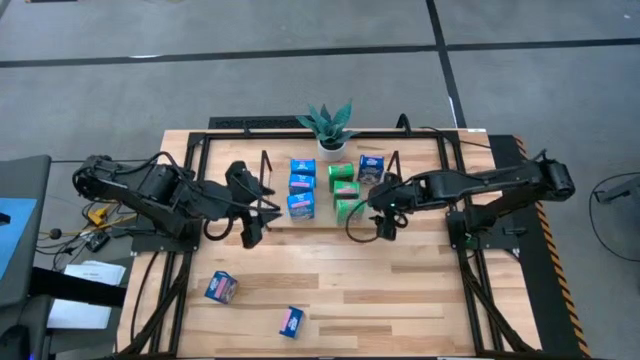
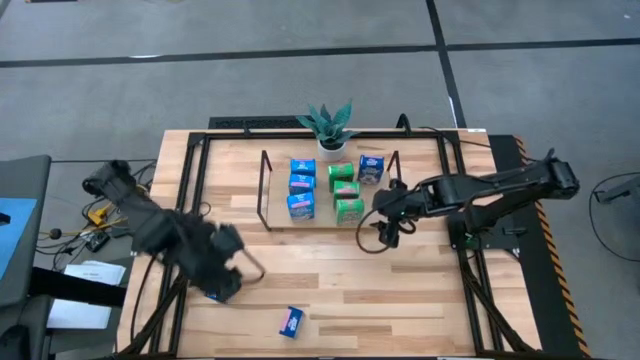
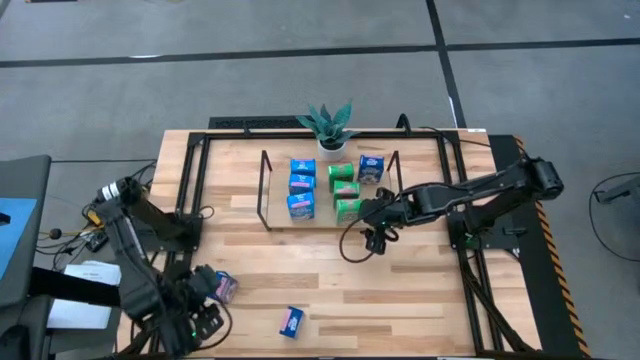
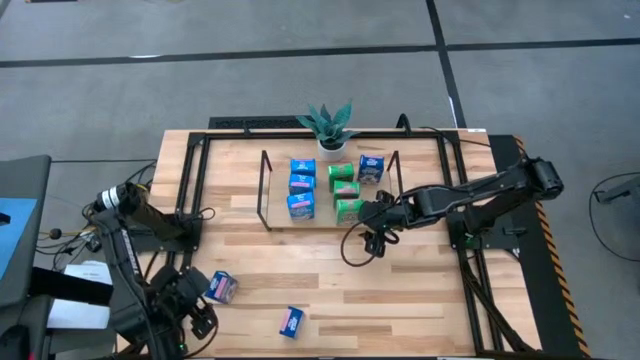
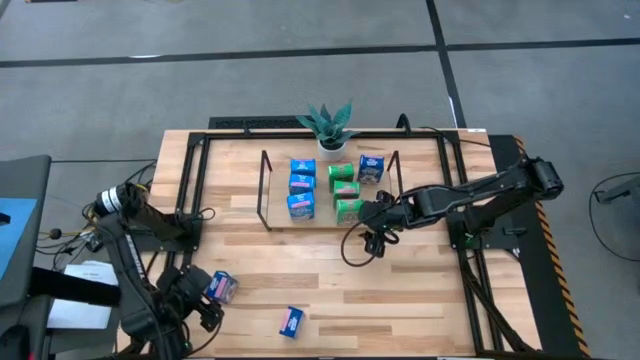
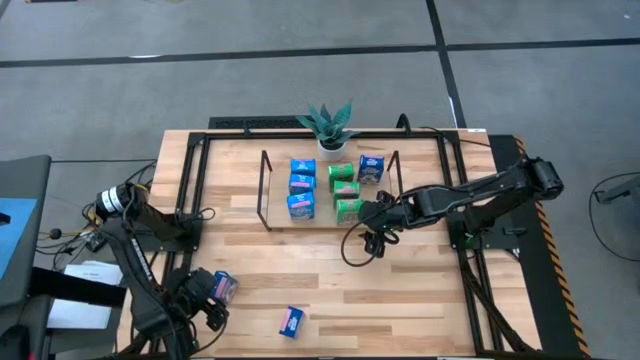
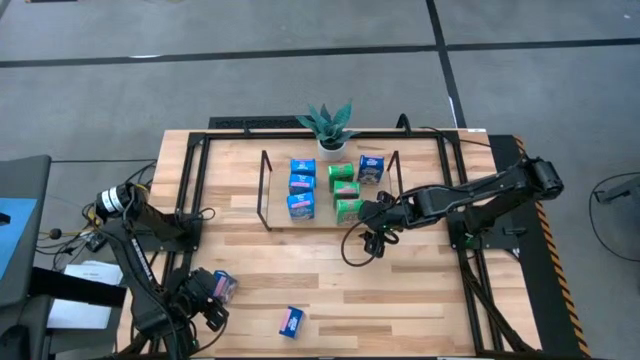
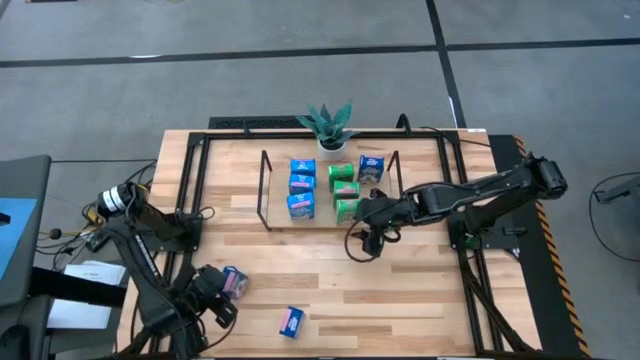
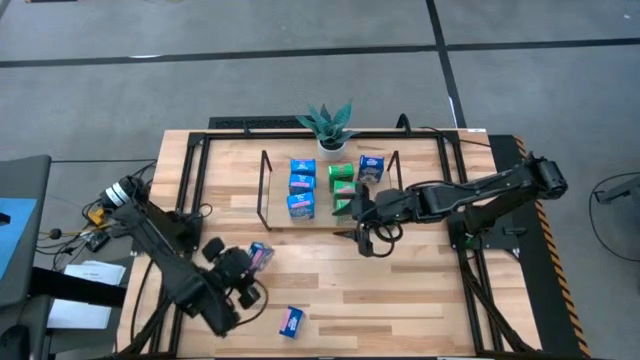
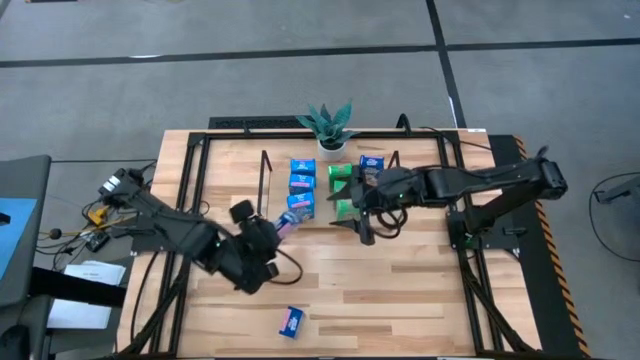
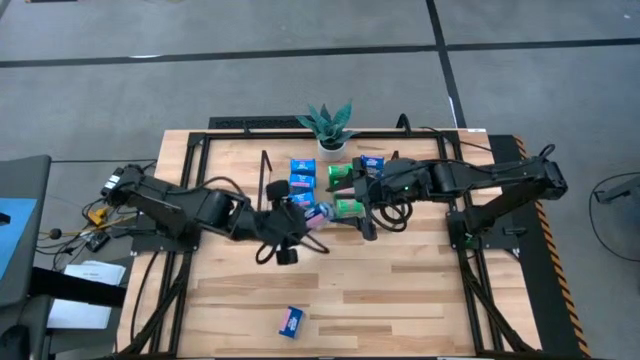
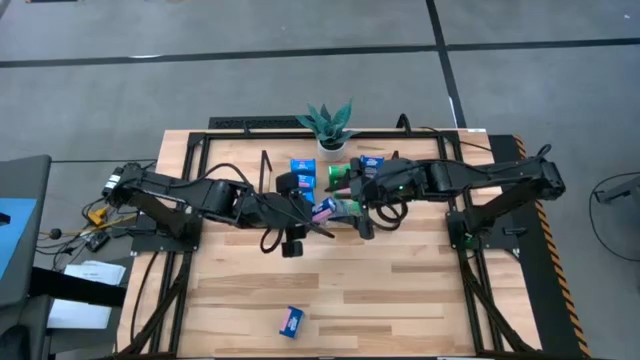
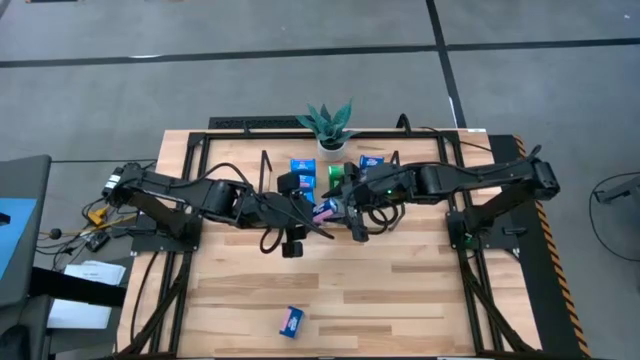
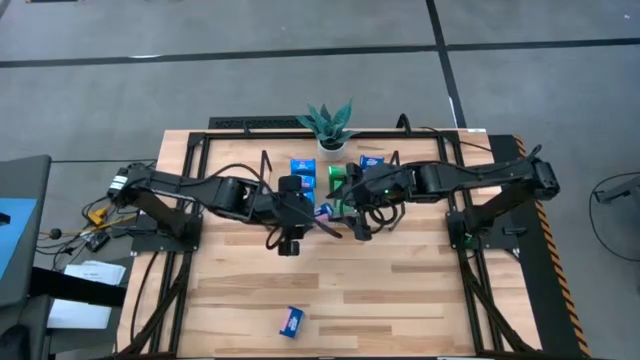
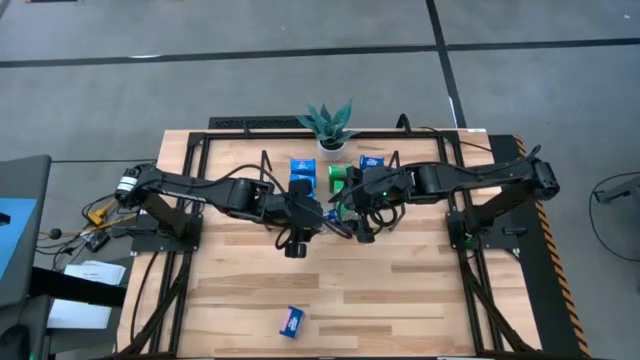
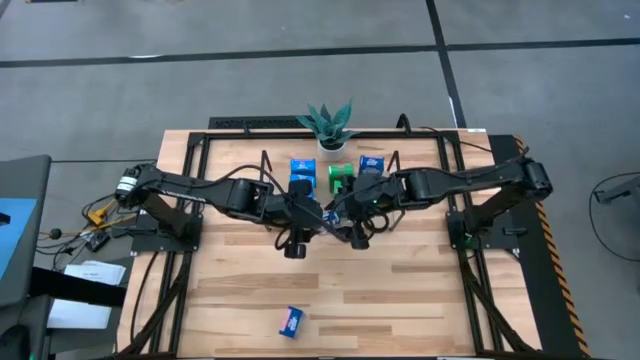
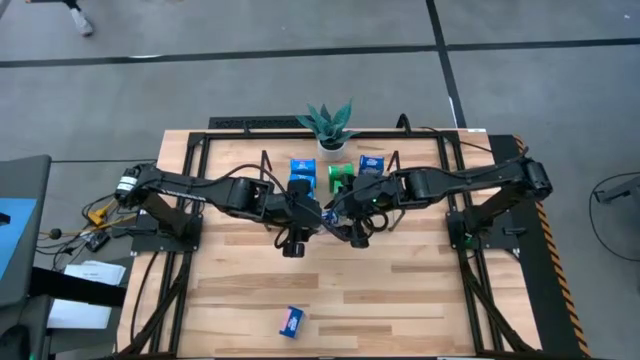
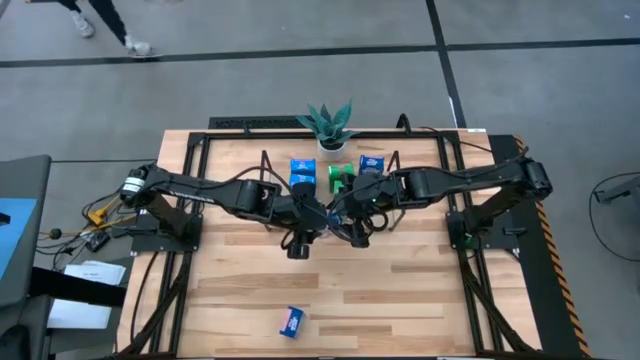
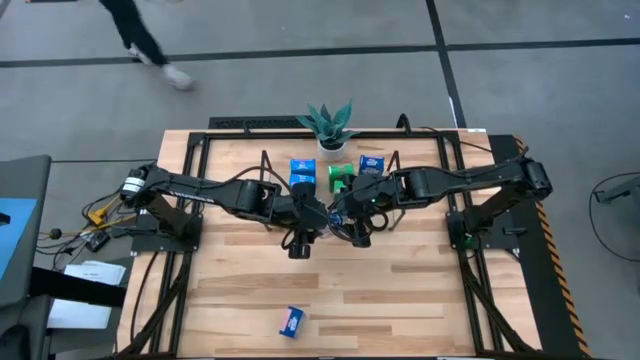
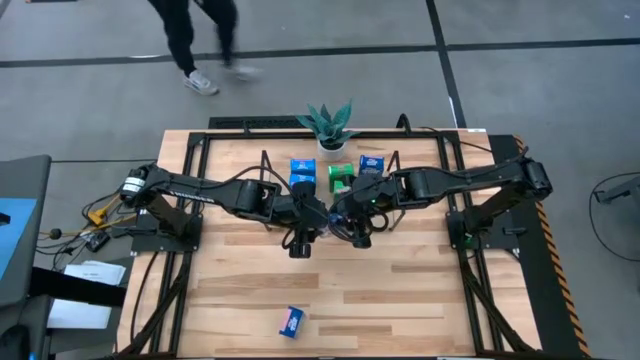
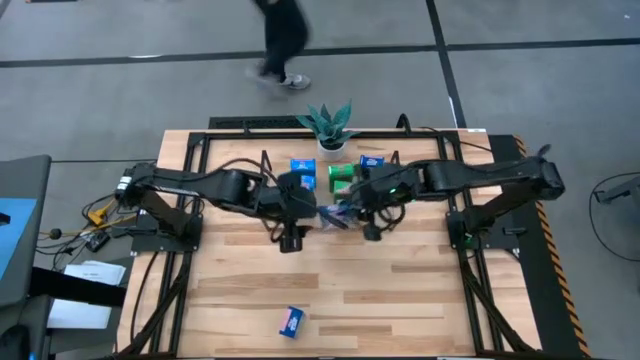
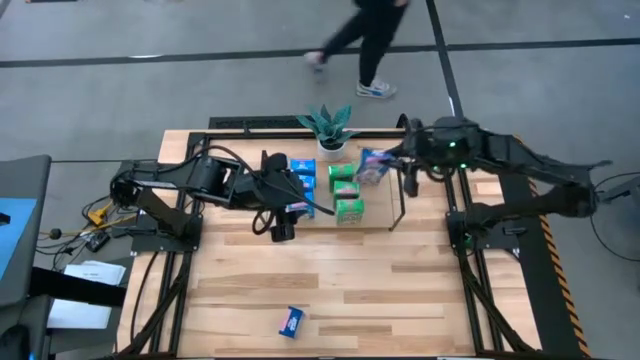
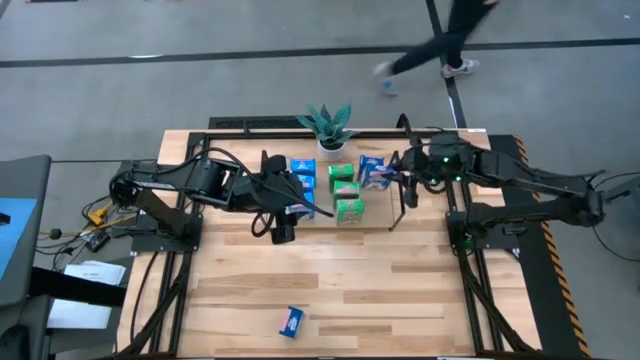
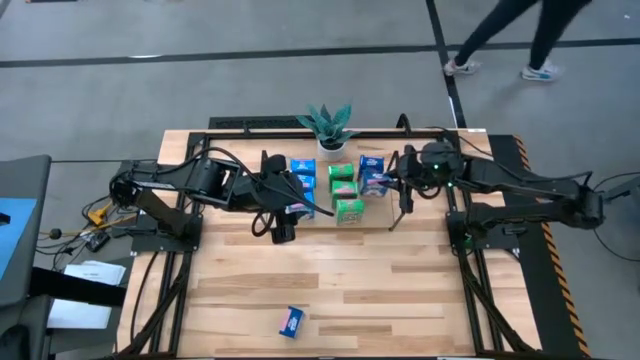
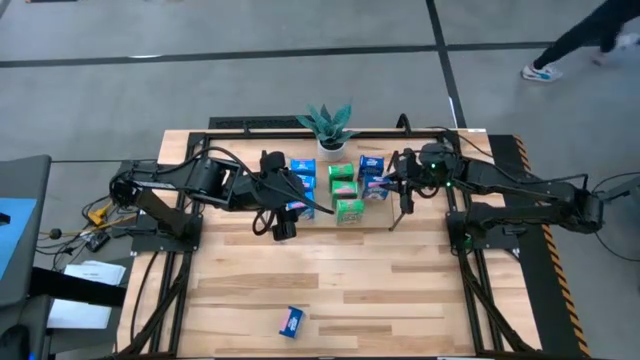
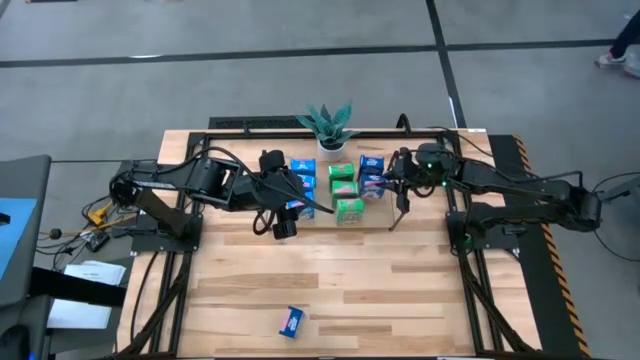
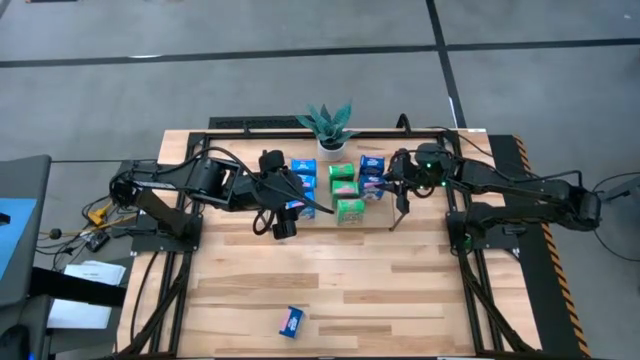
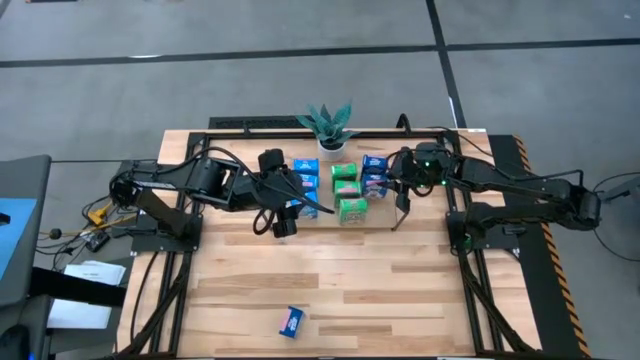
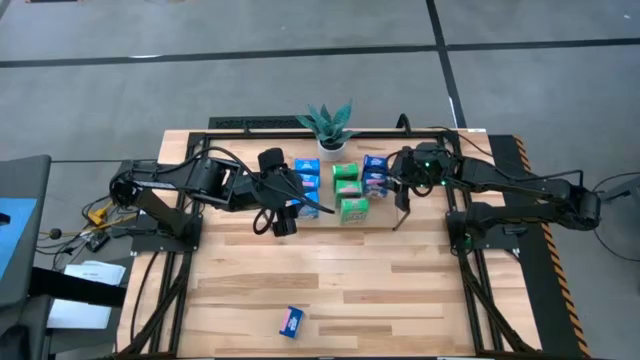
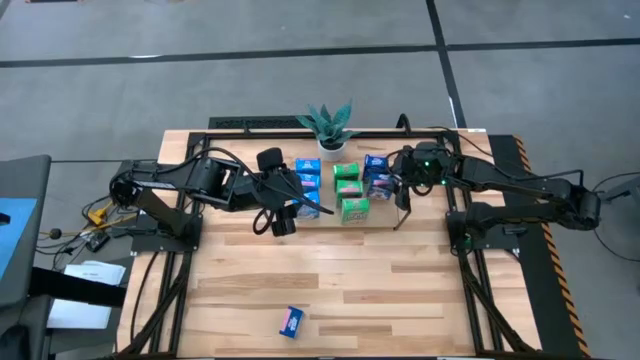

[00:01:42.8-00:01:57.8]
Task: Stack cereal on shelf
Put the left blue cereal box on the shelf aligned with the other blue cereal box

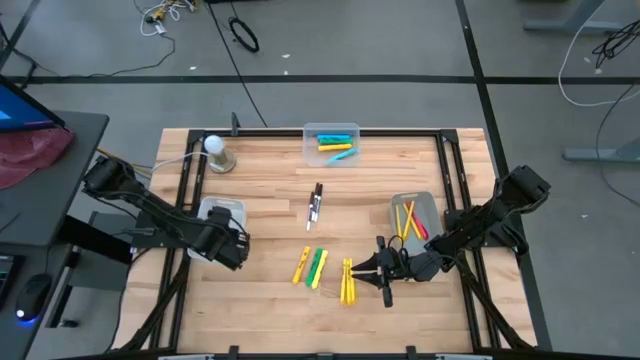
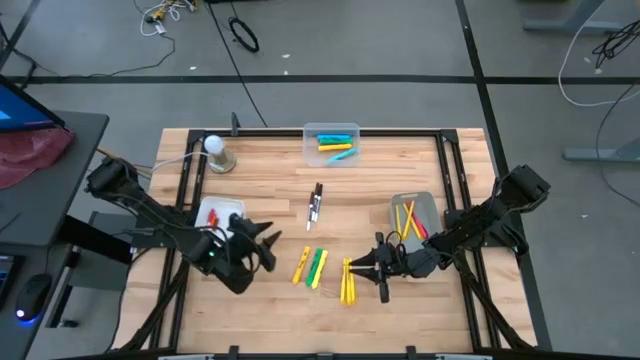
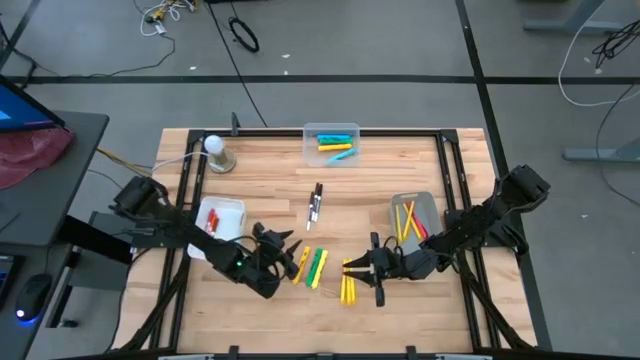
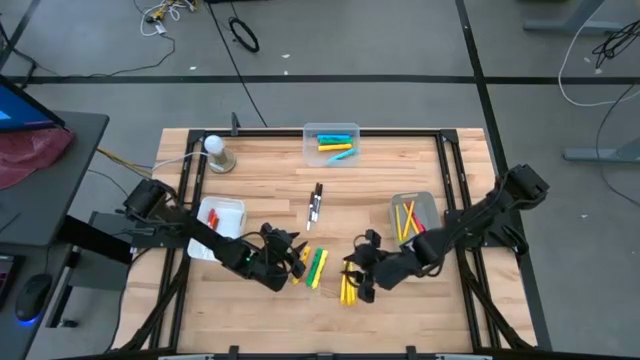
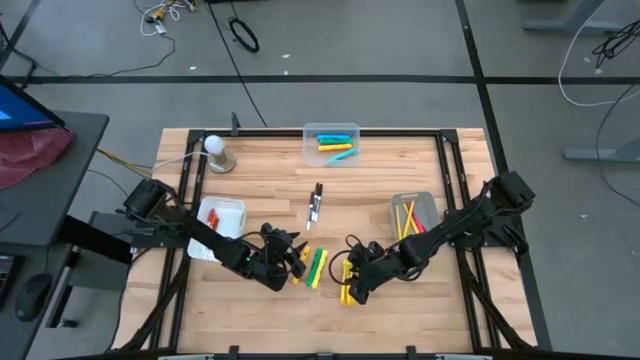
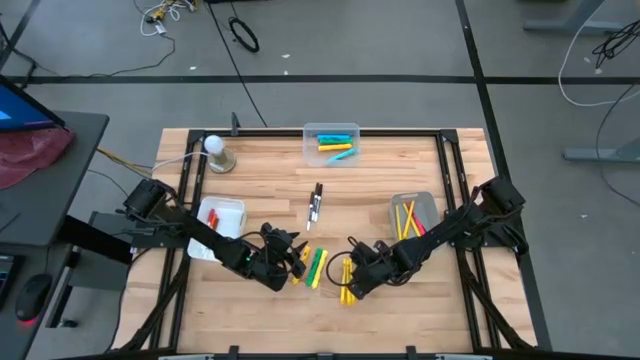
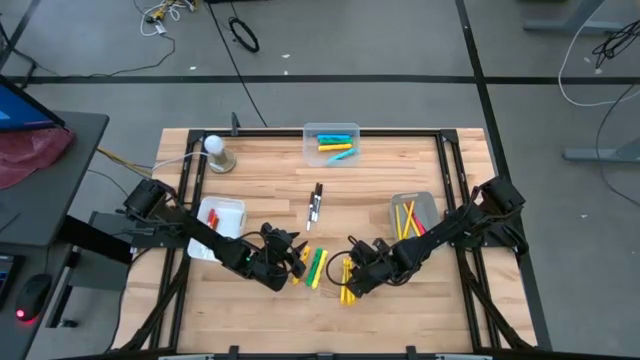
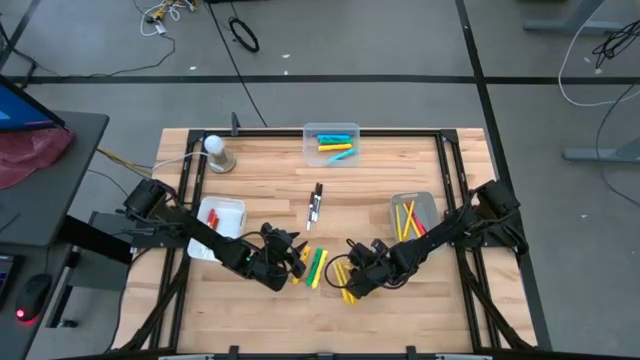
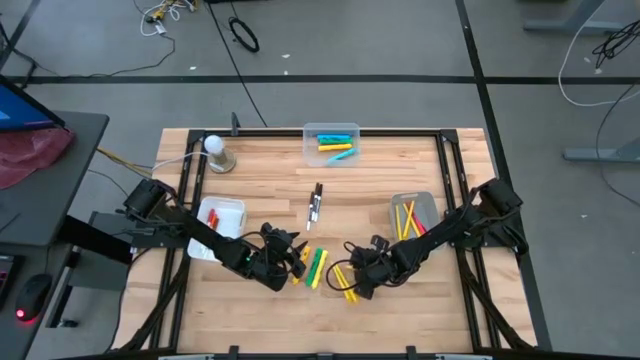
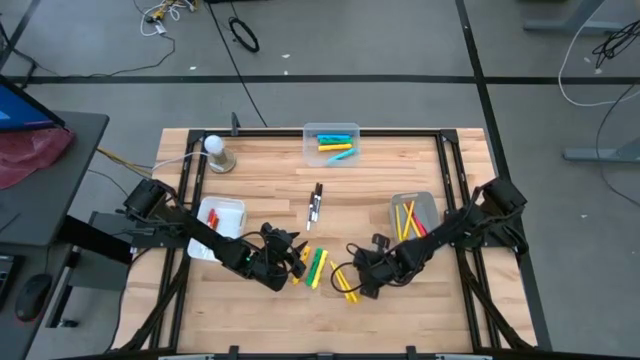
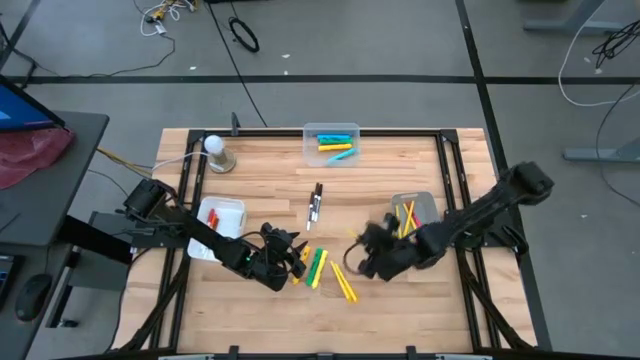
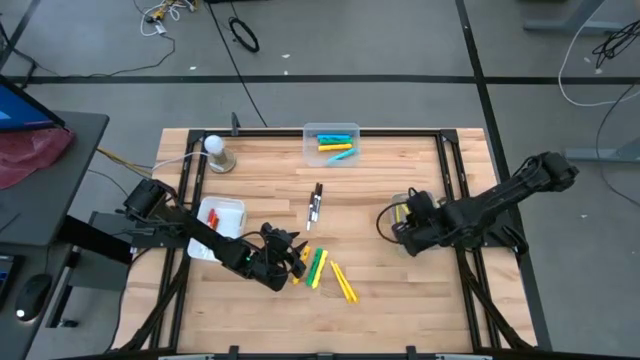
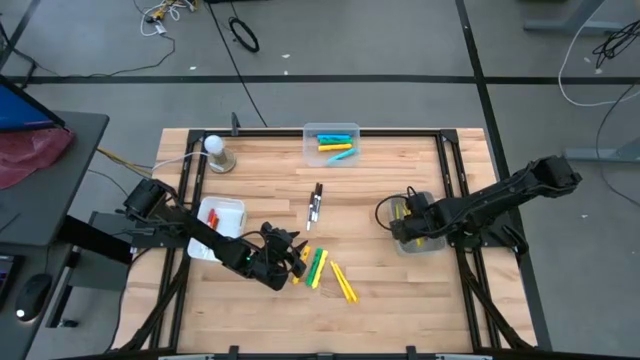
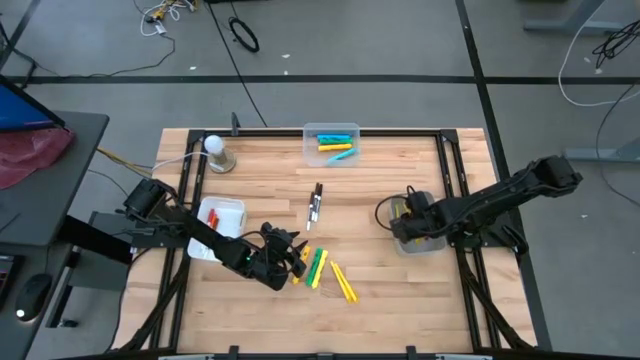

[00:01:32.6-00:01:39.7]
Task: Pick & Place Markers
Put the yellow pen into the gray bin
